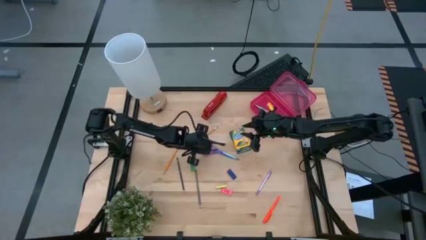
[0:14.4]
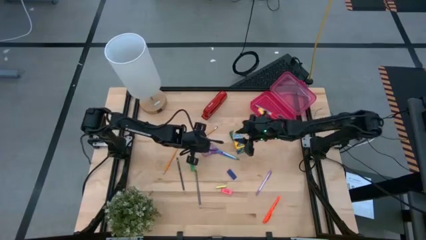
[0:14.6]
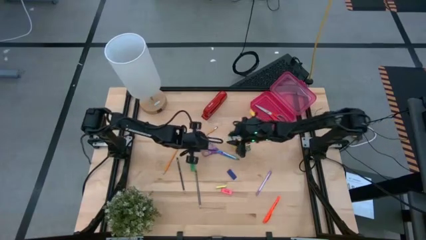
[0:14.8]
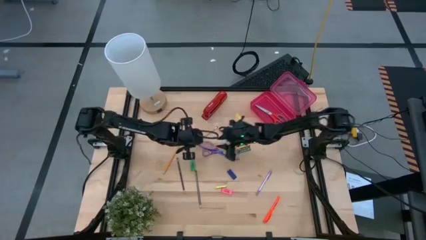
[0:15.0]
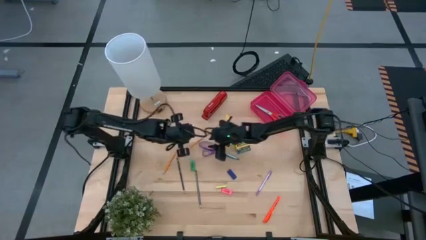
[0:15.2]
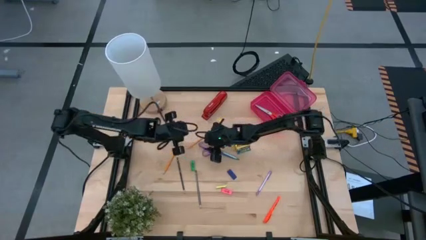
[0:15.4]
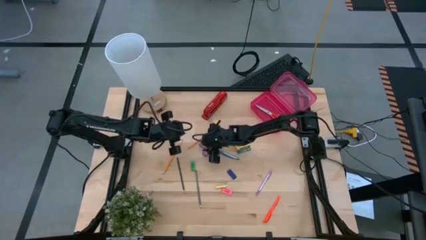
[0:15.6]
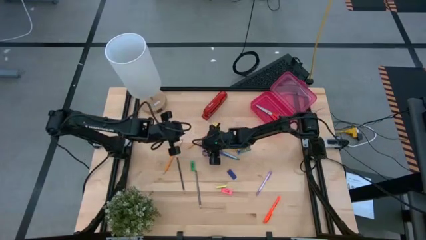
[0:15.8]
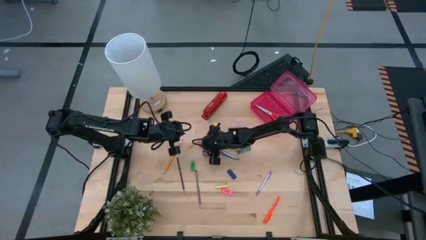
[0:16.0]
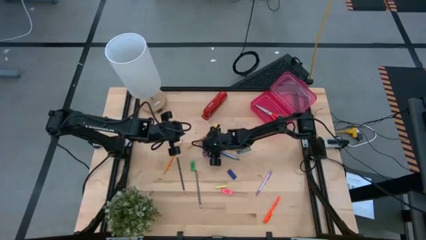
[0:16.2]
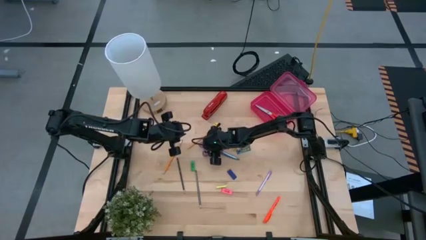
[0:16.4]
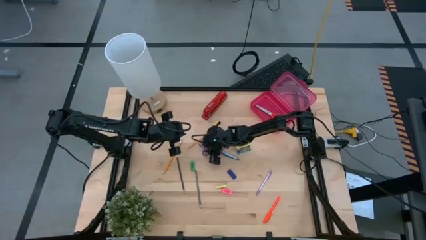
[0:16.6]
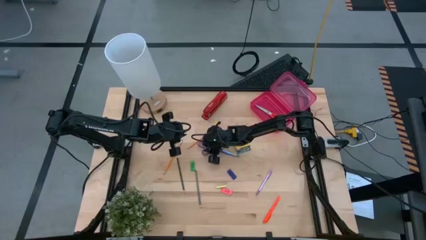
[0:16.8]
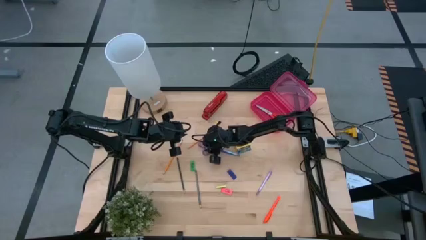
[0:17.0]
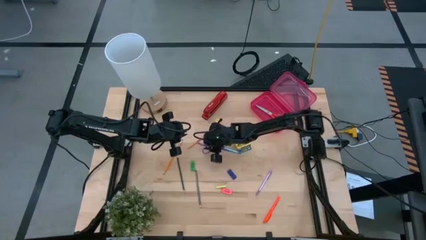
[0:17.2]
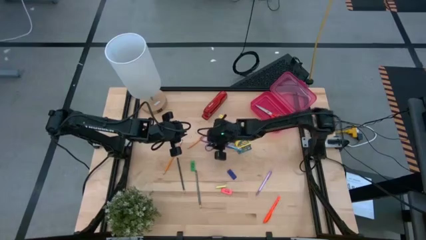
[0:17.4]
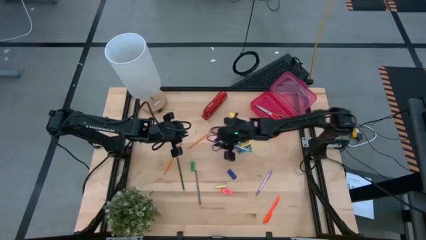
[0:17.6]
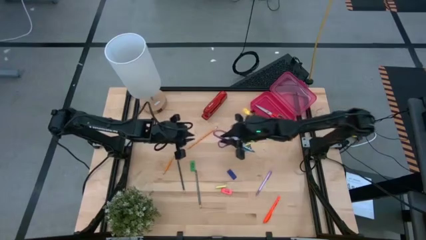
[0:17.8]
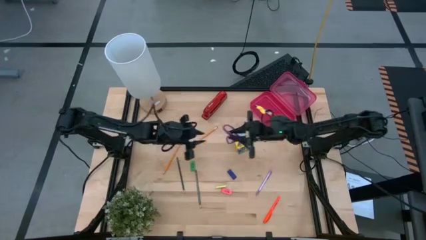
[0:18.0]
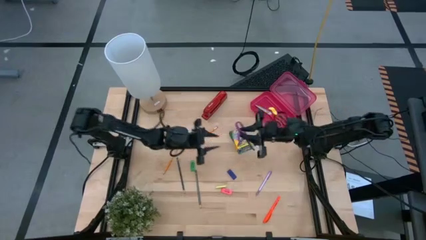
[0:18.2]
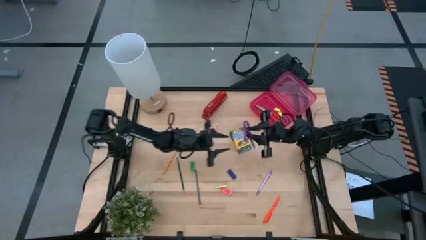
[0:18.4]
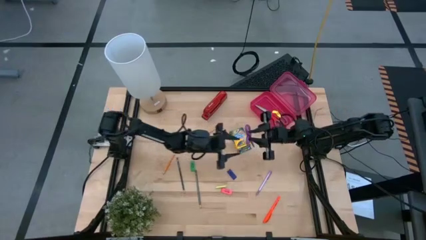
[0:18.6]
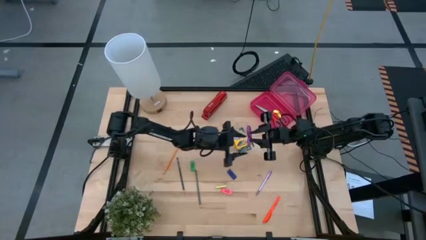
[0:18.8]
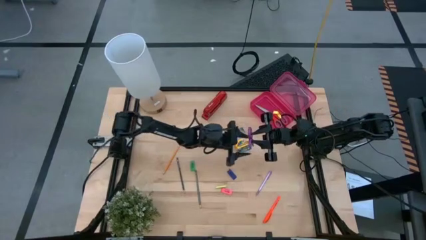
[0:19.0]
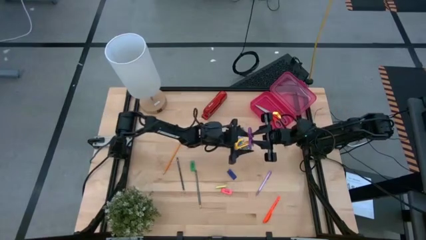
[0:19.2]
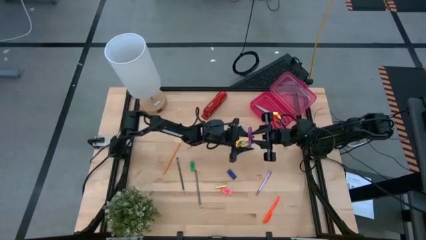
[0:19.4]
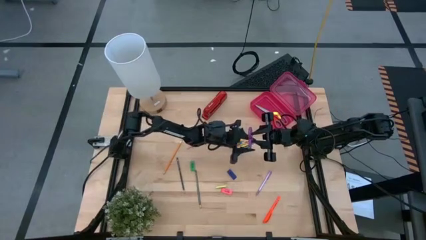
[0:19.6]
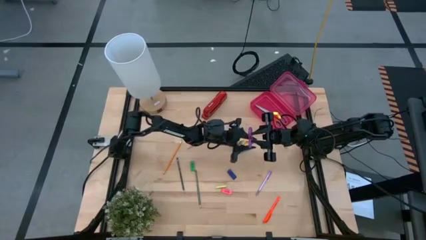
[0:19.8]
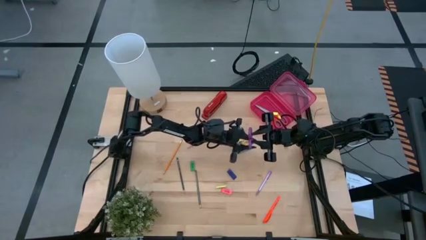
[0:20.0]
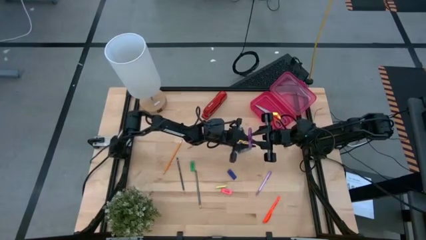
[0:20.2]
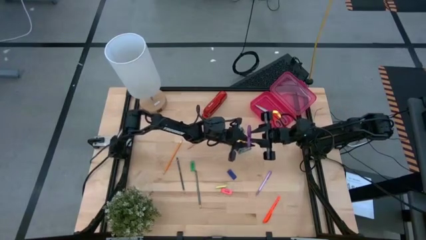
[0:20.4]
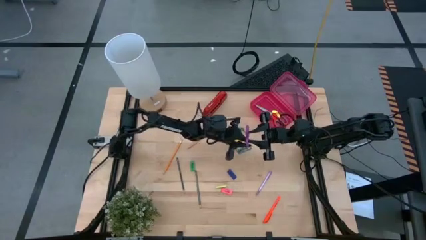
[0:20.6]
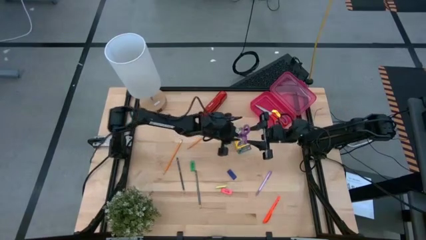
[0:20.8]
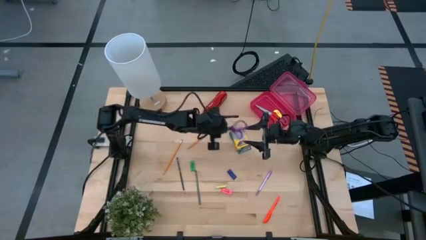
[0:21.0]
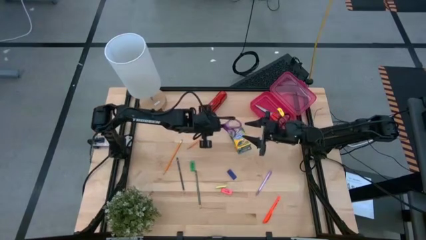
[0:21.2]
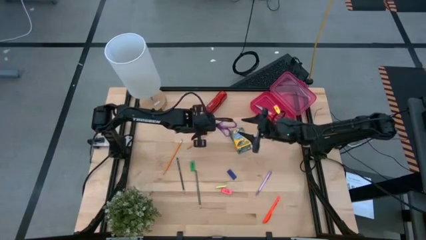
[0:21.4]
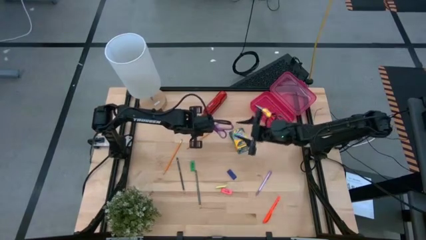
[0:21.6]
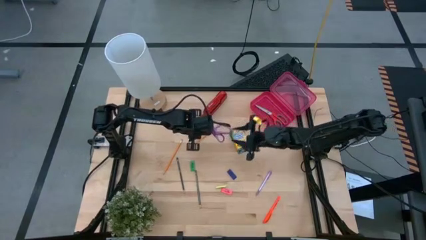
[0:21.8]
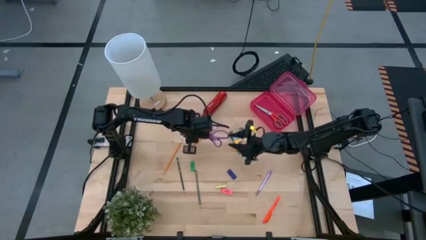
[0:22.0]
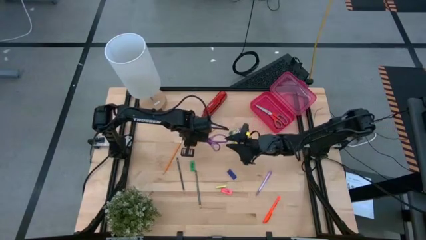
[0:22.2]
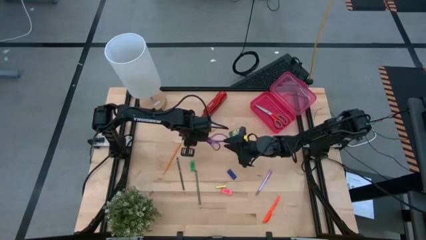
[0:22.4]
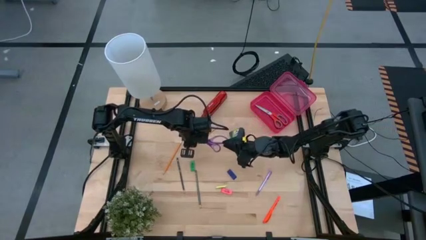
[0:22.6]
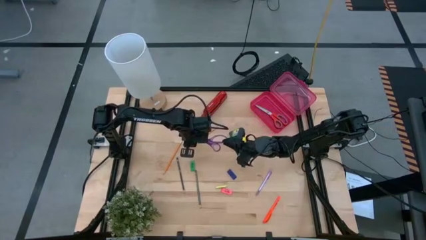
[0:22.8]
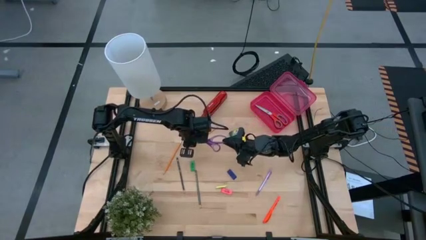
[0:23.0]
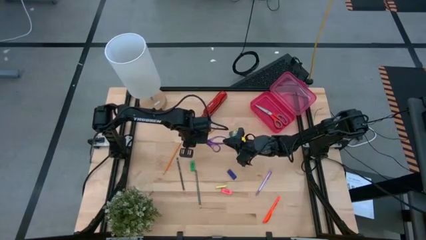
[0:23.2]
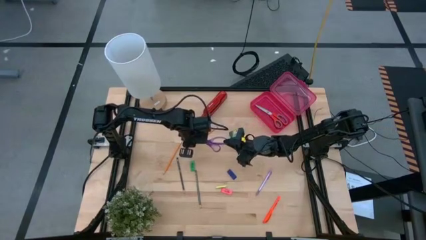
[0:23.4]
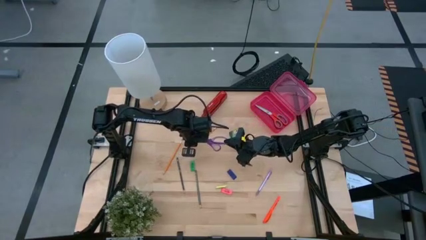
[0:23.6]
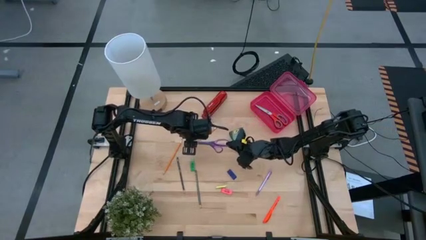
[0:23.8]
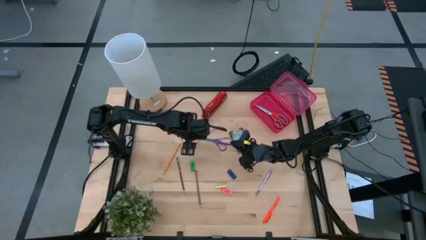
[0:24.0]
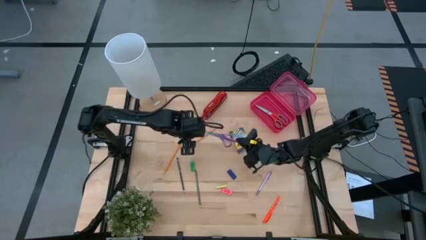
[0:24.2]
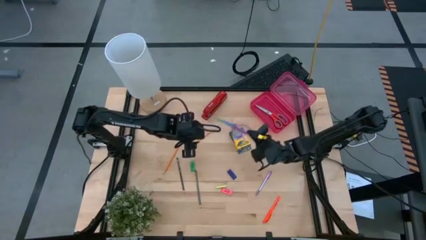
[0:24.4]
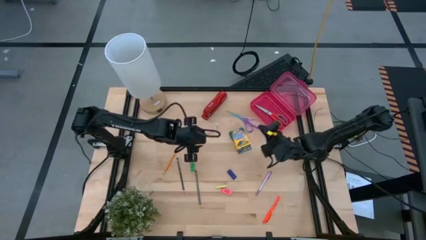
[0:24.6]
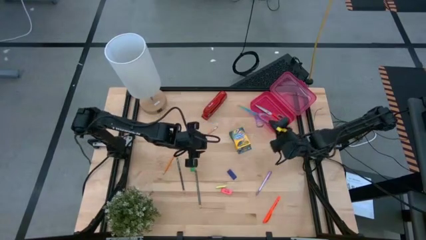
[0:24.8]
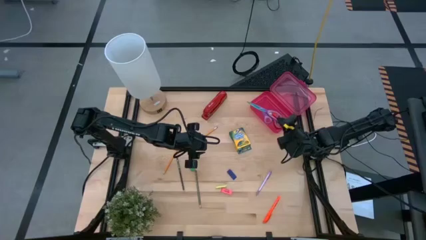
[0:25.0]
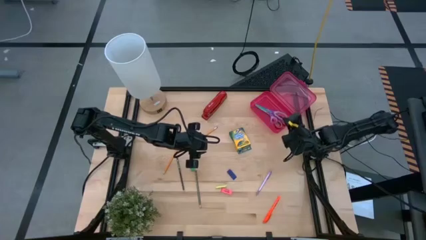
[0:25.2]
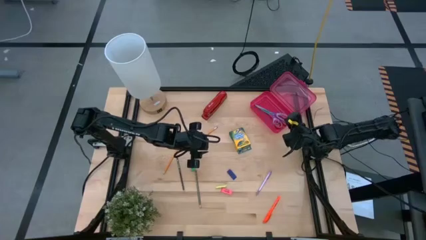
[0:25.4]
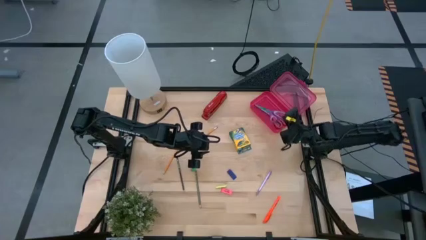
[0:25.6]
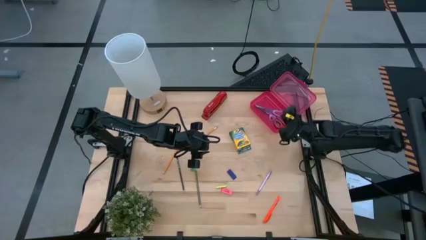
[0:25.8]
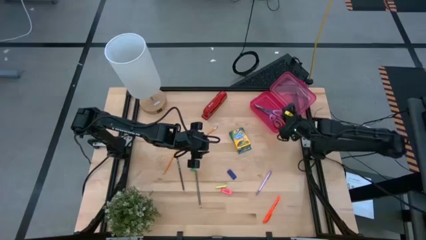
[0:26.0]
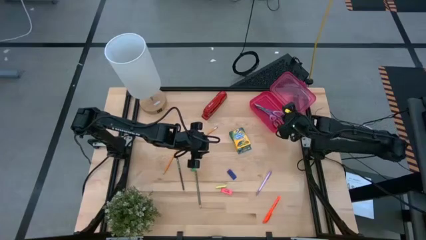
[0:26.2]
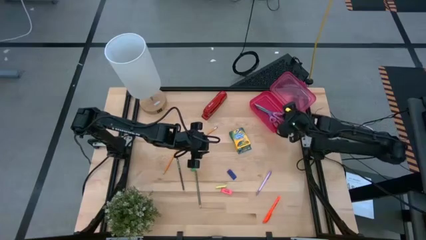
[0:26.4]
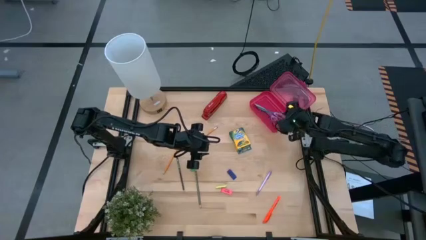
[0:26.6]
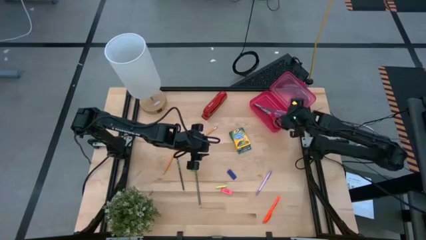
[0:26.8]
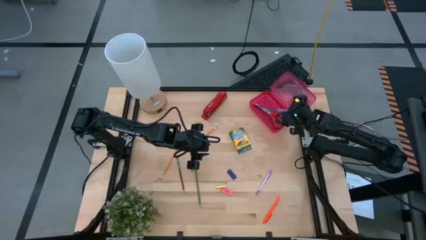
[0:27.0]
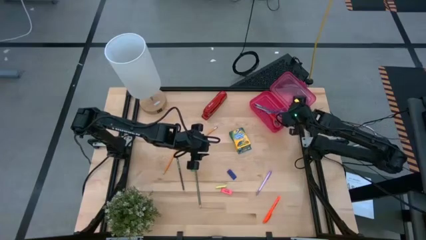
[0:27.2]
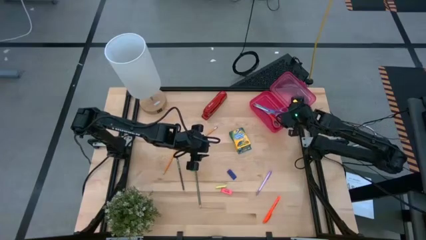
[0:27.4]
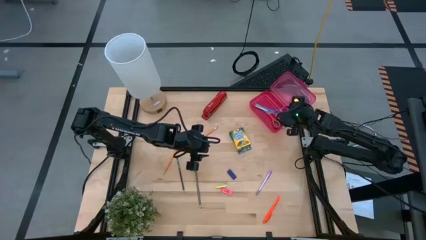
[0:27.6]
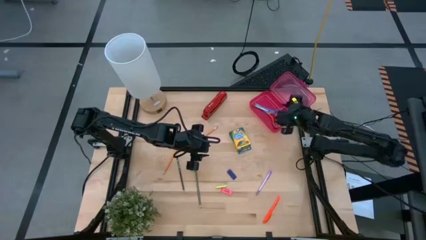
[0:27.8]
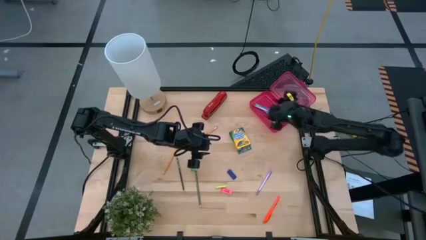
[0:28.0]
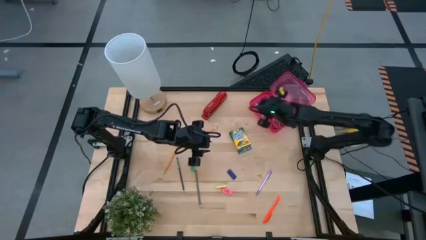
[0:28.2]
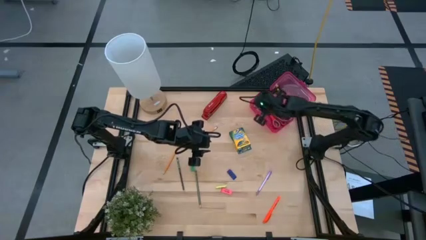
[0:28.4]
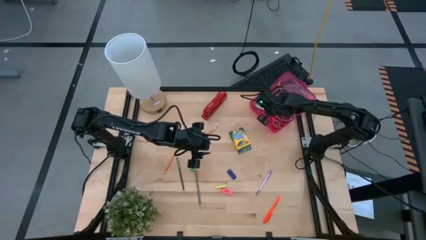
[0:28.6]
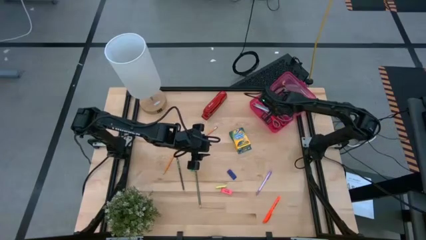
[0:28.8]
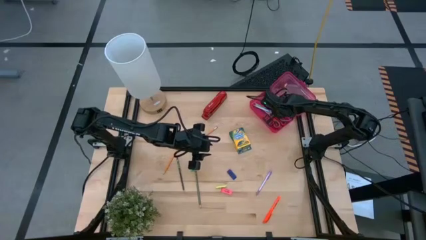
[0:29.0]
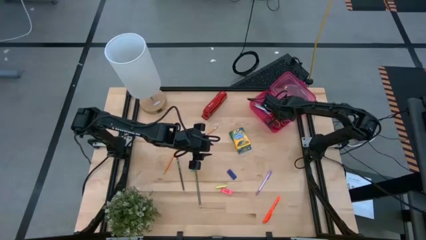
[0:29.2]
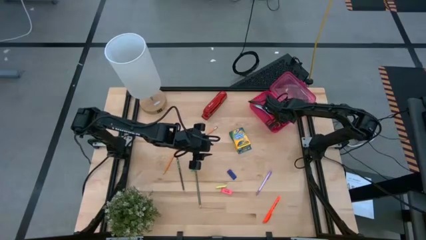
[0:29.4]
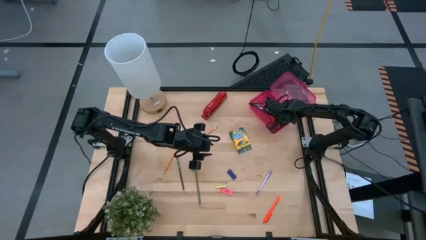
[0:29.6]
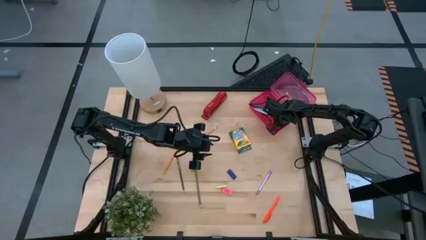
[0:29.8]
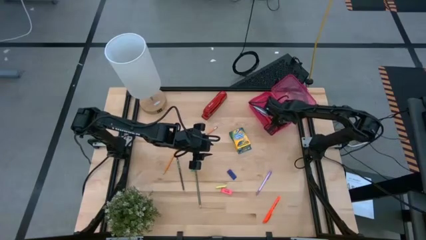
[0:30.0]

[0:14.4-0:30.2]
Task: Pack school essentials
Put the purple scissors into the pink supply box
